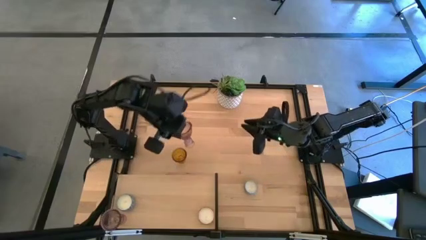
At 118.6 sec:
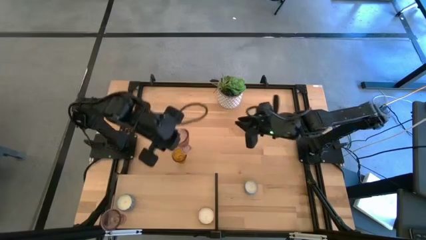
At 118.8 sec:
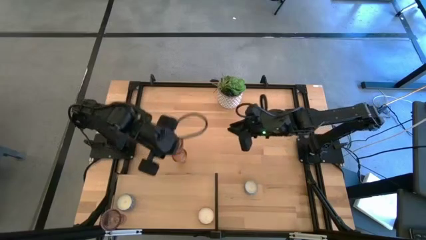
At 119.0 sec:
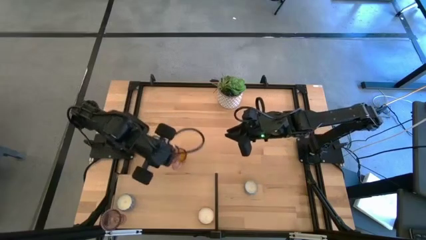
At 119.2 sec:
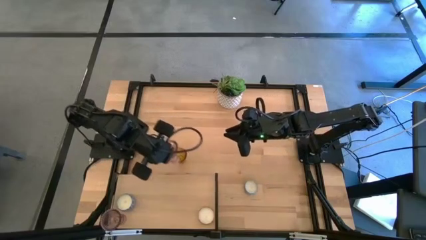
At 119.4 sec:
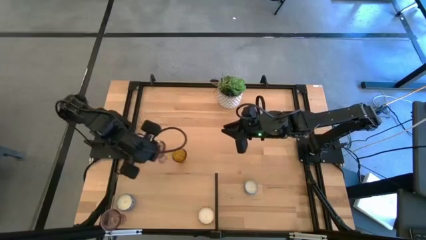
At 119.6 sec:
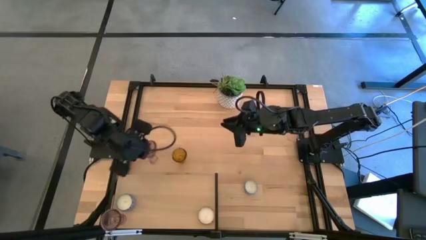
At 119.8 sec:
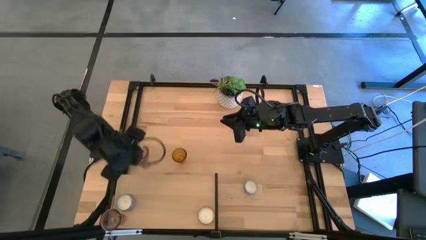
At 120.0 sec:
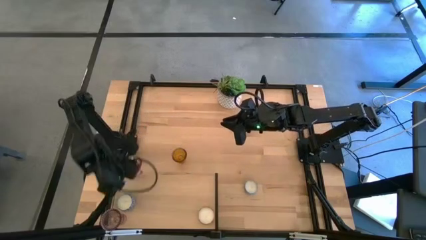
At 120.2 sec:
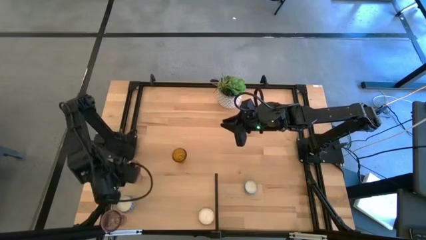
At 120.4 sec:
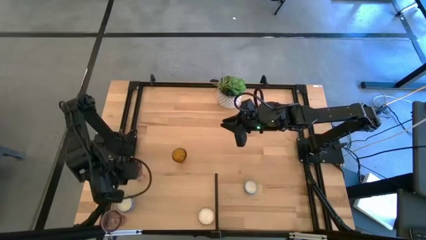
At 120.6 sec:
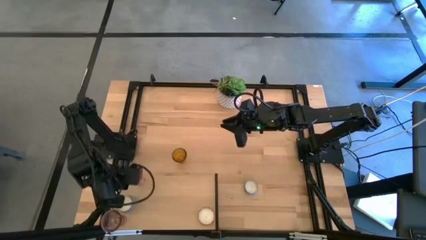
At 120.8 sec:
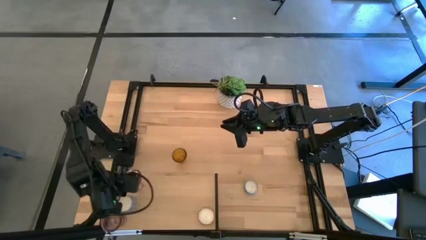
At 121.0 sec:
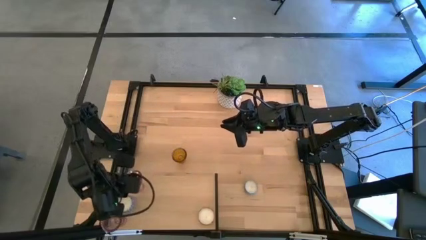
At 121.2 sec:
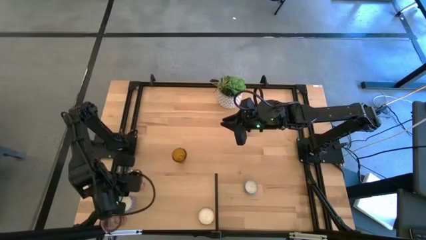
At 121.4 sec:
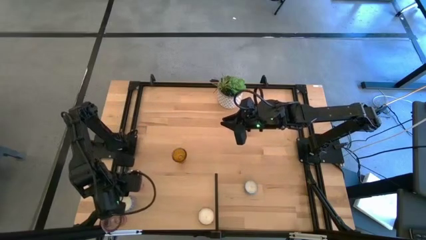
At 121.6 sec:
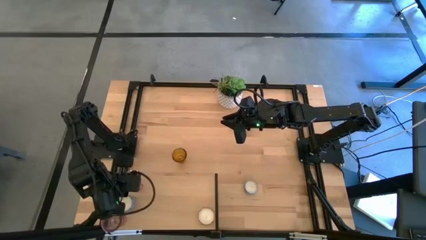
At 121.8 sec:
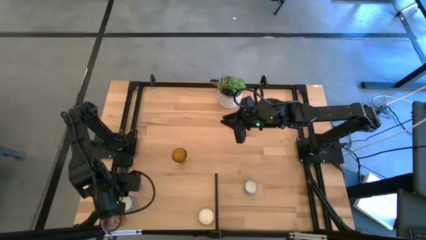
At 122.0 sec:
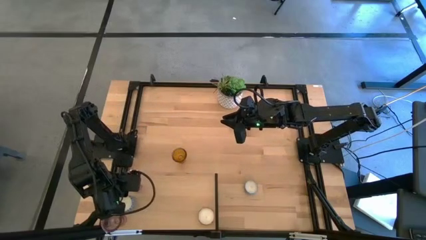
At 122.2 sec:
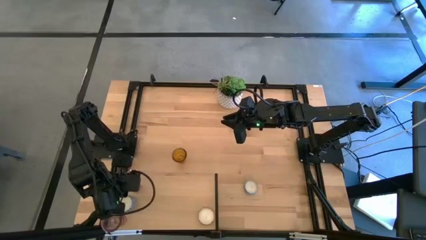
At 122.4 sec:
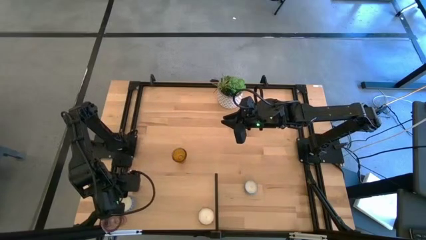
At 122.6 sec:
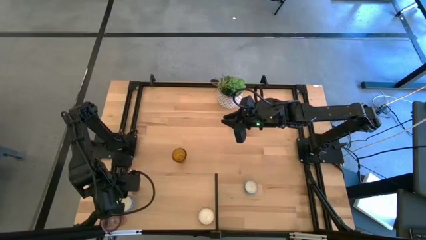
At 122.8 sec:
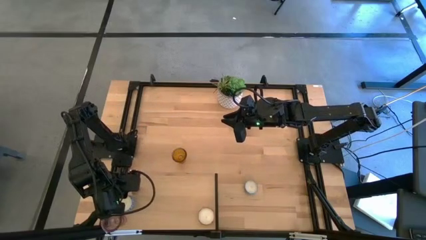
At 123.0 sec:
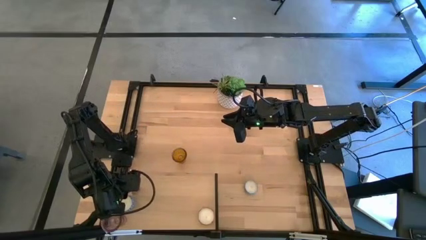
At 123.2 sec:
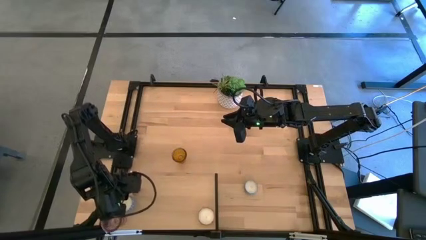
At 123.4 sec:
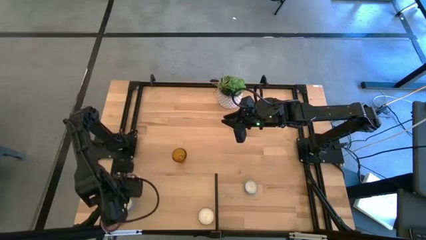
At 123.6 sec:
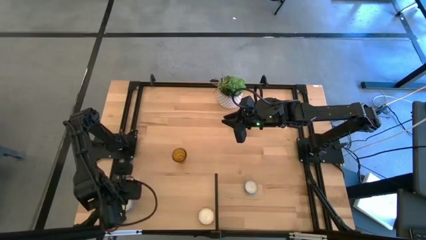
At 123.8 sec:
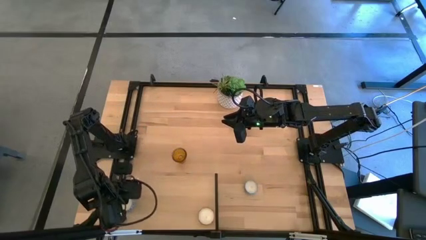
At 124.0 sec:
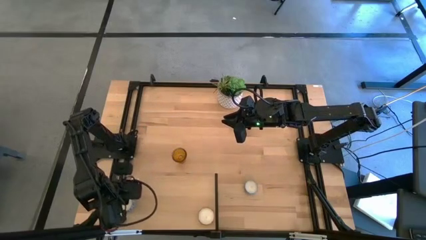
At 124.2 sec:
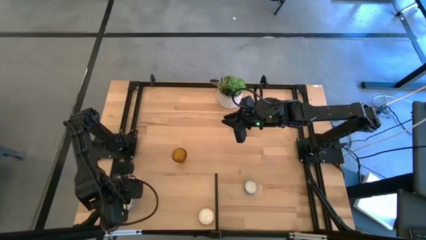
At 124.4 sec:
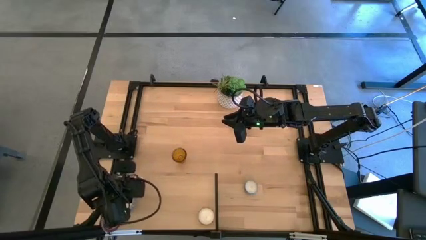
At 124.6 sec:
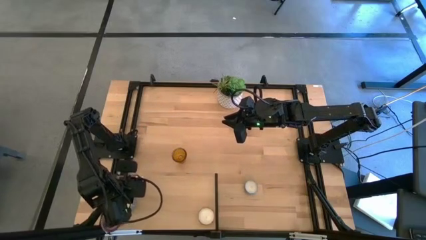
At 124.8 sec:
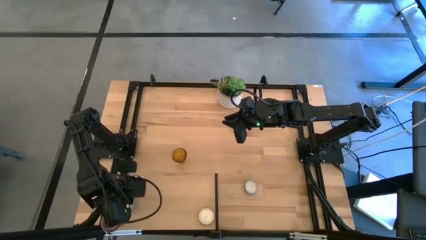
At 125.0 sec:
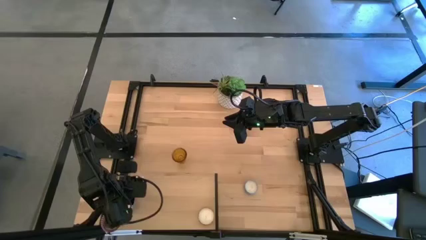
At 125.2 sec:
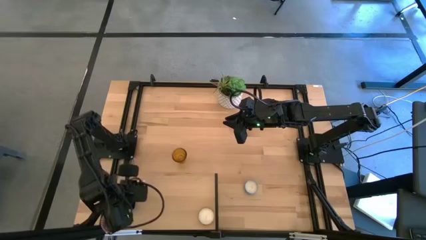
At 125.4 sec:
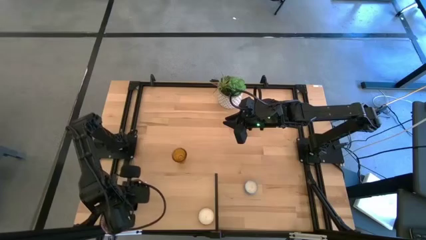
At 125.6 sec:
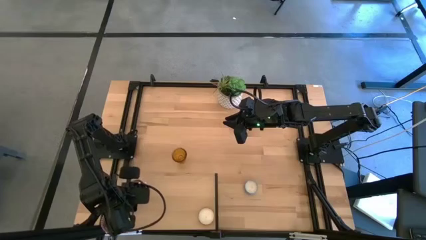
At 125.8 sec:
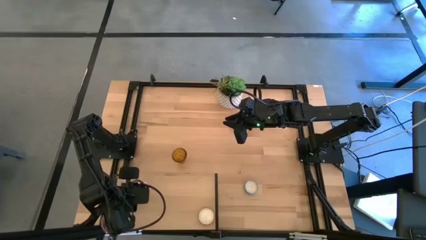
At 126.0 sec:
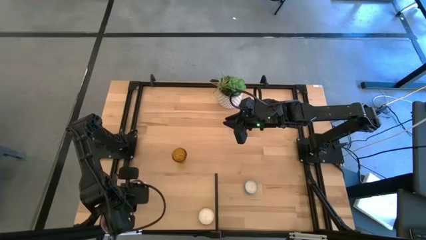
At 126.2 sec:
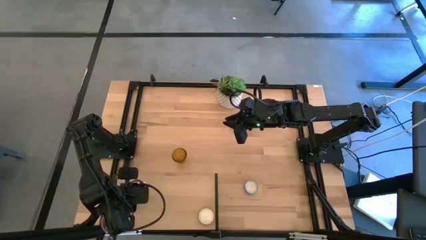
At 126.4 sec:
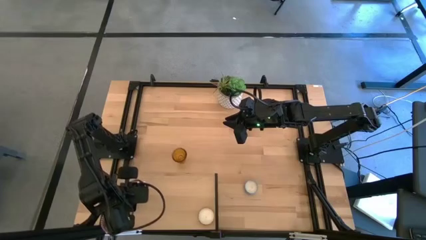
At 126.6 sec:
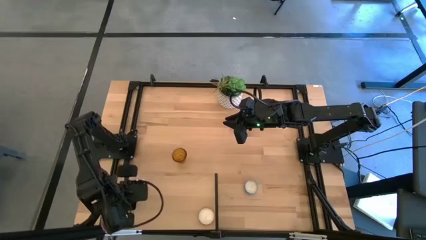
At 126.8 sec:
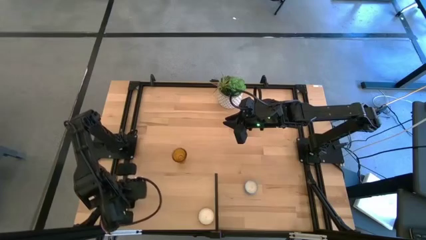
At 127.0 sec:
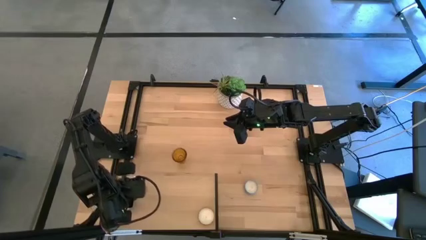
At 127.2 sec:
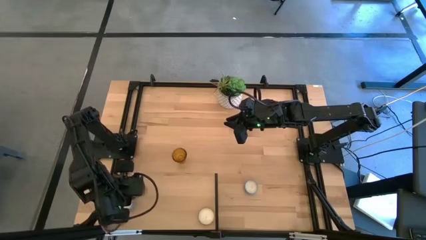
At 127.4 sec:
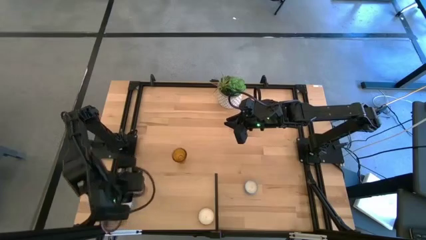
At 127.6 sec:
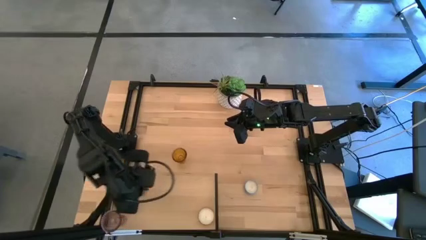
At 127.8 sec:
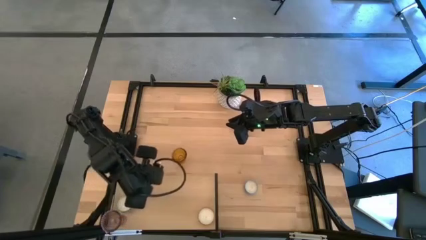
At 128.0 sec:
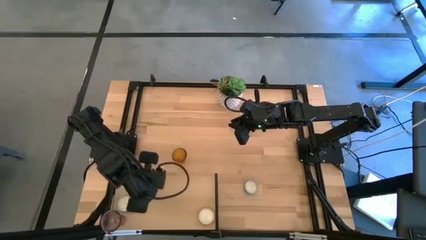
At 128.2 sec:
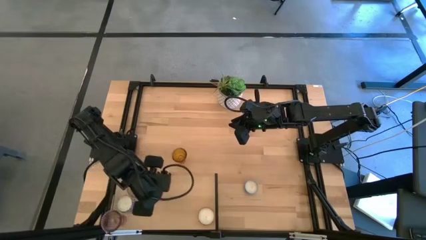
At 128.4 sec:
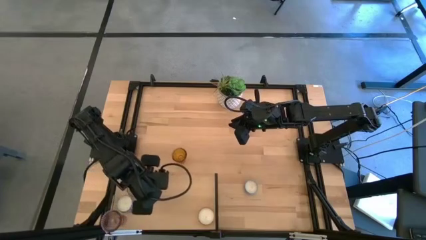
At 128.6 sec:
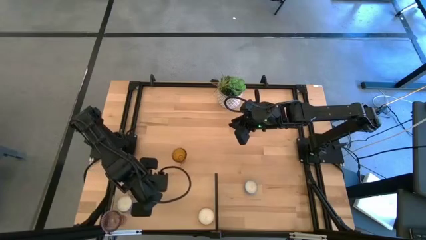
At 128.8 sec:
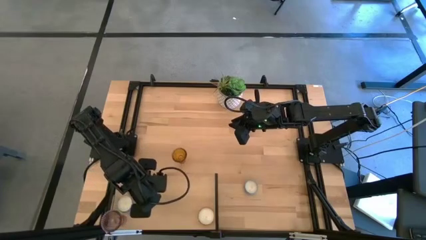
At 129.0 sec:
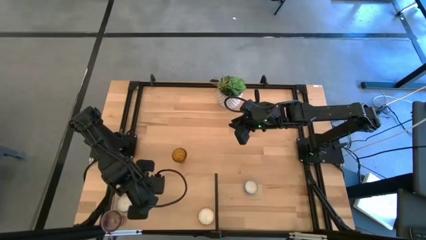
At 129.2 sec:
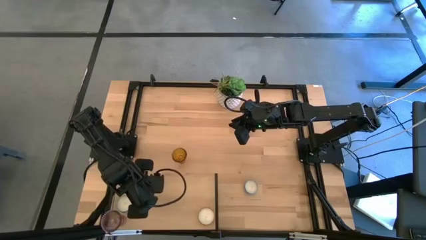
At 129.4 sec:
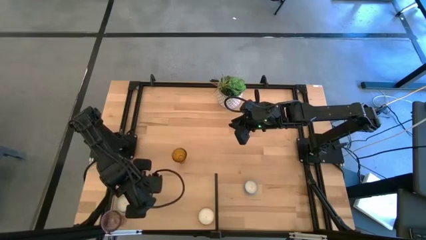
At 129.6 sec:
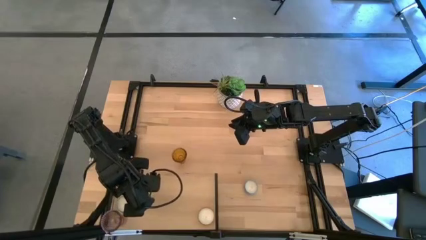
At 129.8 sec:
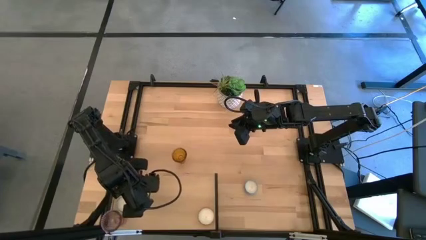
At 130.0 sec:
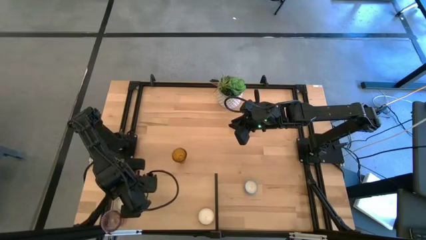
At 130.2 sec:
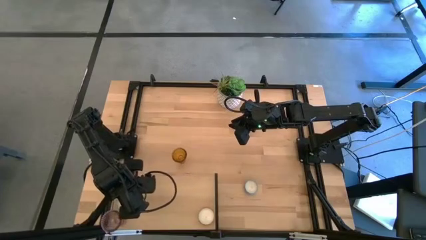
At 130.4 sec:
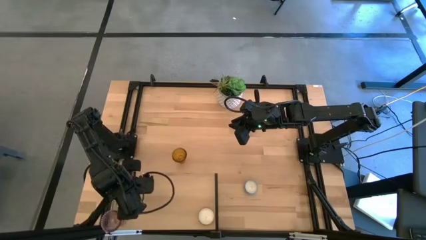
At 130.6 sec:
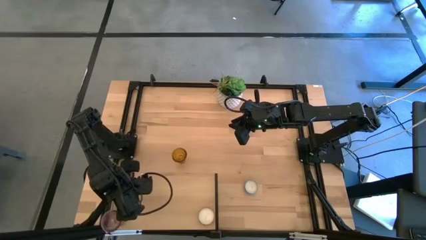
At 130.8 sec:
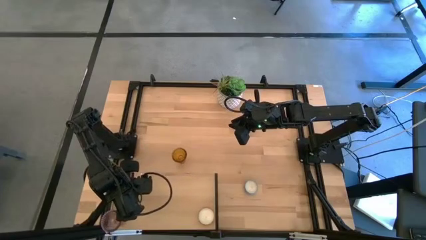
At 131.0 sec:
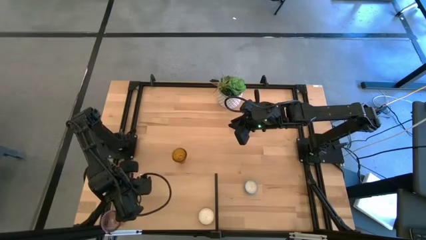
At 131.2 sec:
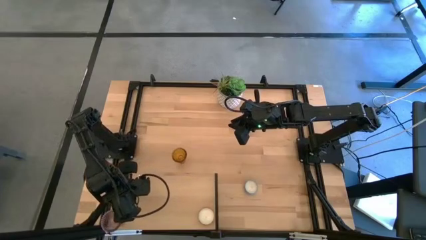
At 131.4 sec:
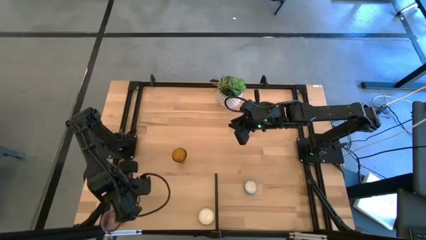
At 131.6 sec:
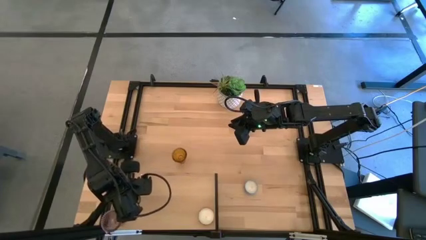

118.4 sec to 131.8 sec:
Task: Pick & Place candle stick holders
Put the pink glass on the shelf

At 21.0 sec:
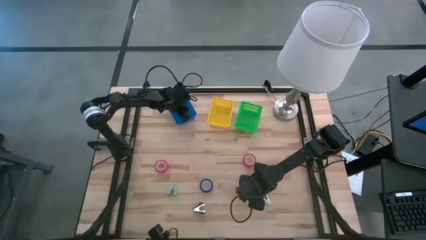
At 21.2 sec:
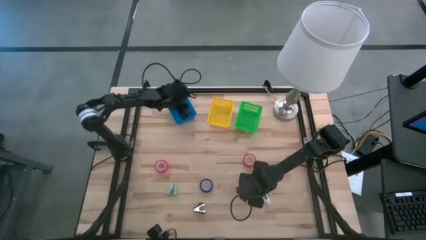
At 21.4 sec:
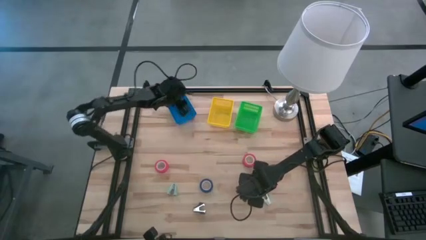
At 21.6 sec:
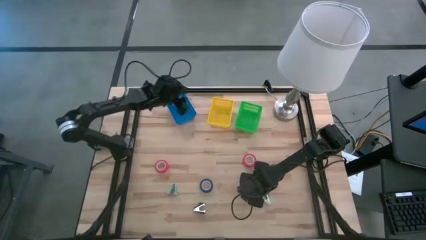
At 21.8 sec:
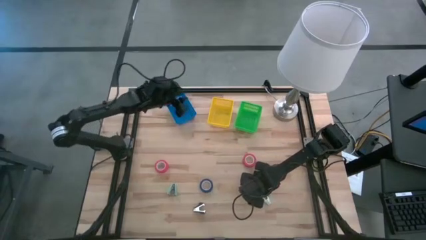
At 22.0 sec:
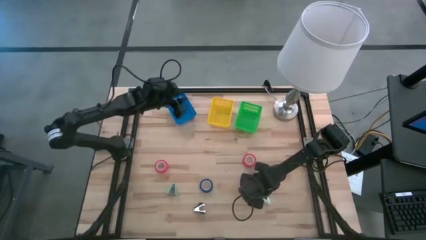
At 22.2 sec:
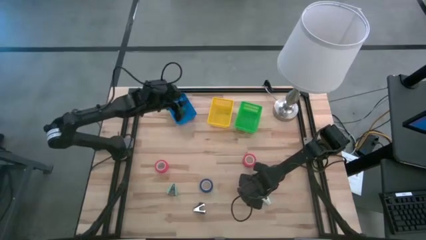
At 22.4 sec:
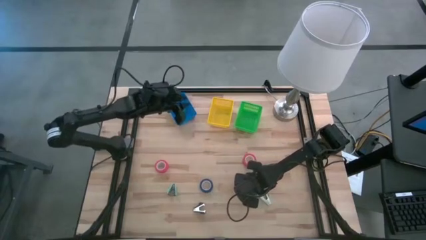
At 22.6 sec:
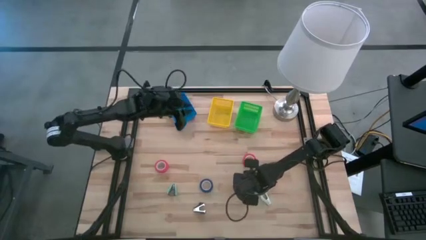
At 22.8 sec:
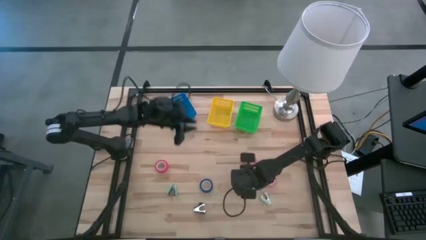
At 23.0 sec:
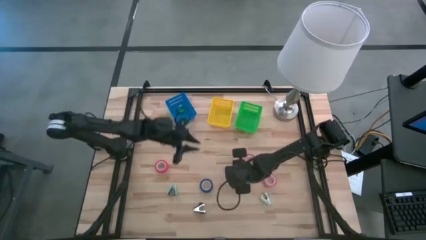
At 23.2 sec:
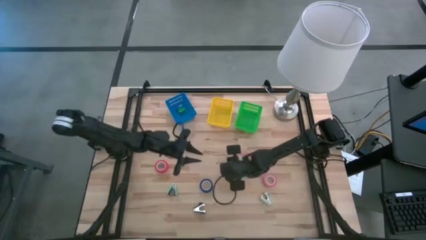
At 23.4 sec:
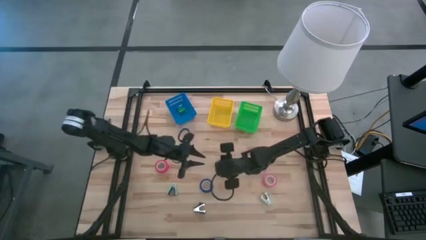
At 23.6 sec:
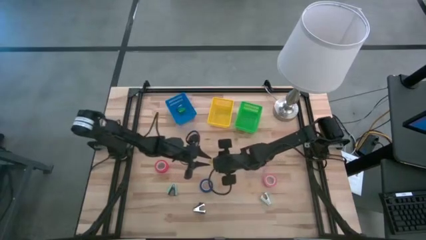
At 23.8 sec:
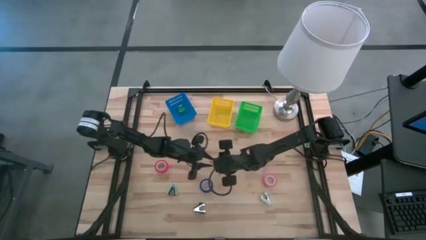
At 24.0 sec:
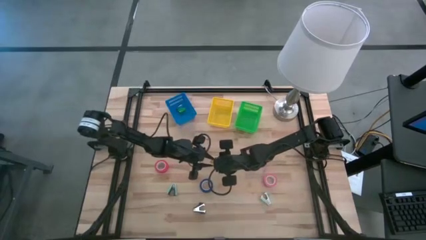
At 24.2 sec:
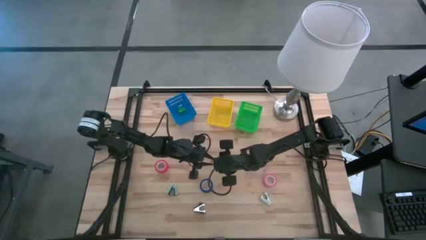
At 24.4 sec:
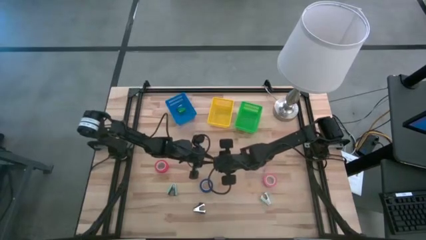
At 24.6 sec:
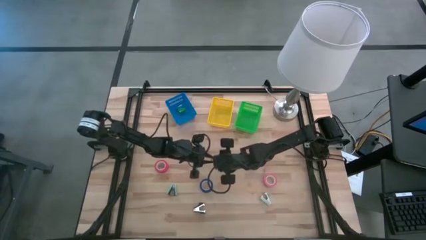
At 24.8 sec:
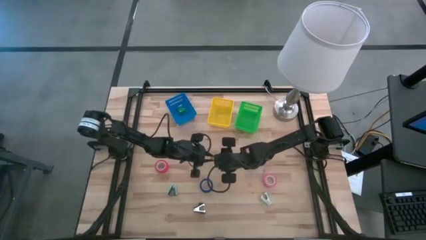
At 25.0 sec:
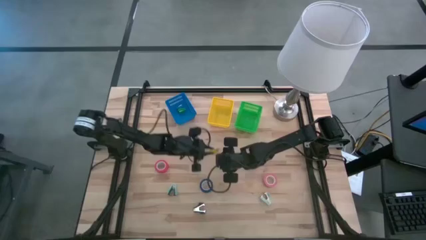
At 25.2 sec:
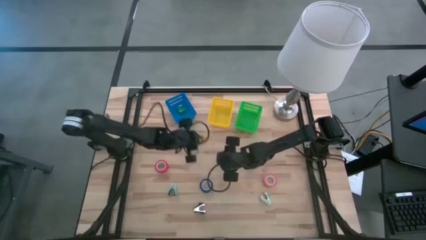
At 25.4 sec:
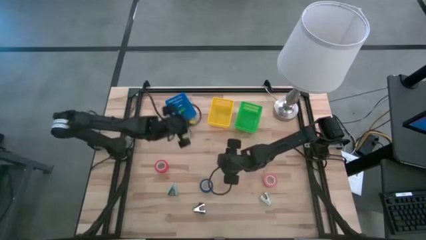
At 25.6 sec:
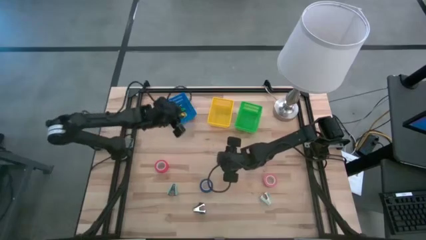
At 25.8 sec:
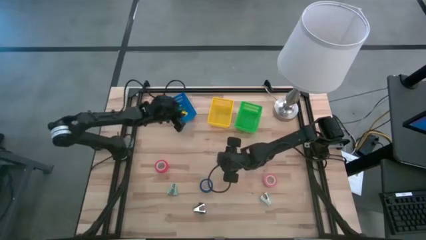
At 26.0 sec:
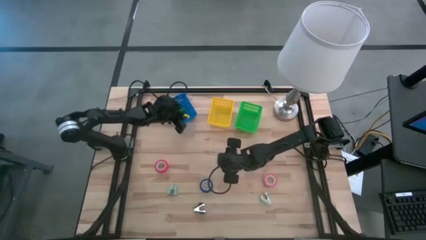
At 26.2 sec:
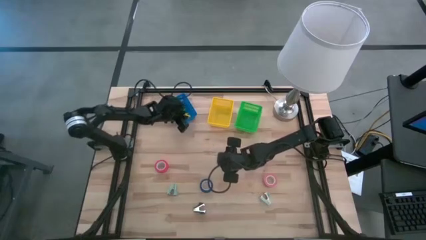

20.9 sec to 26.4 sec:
Task: Pick and place Stapler, Stapler remover, tape
Put the yellow stapler into the blue bin
